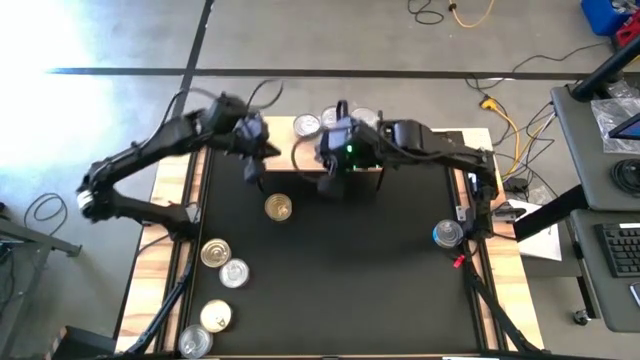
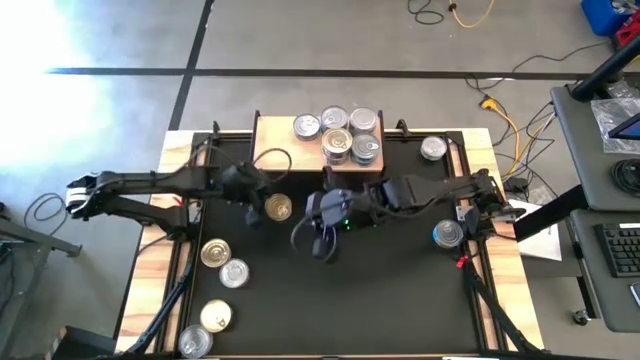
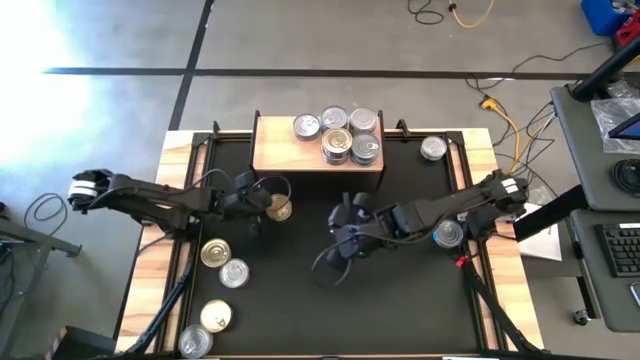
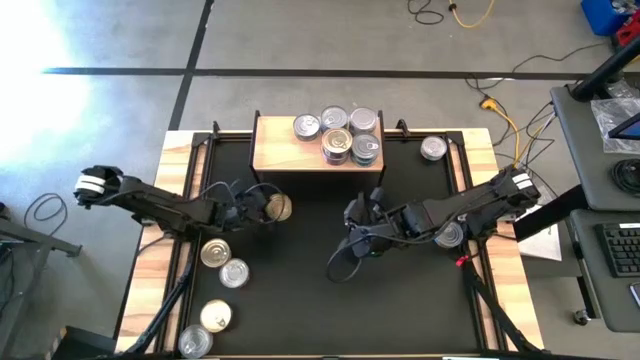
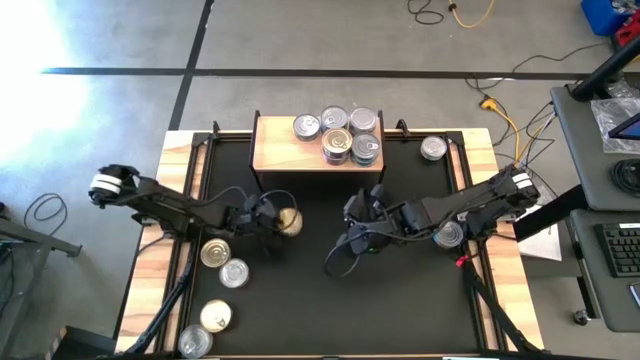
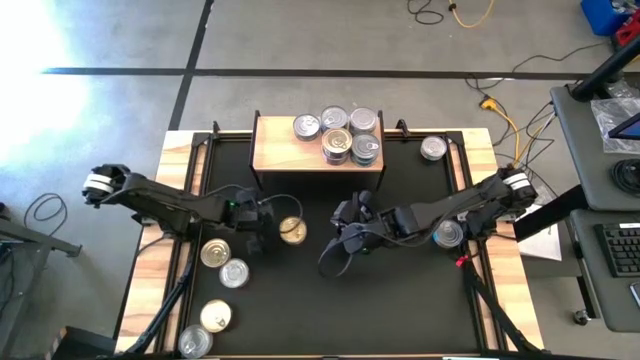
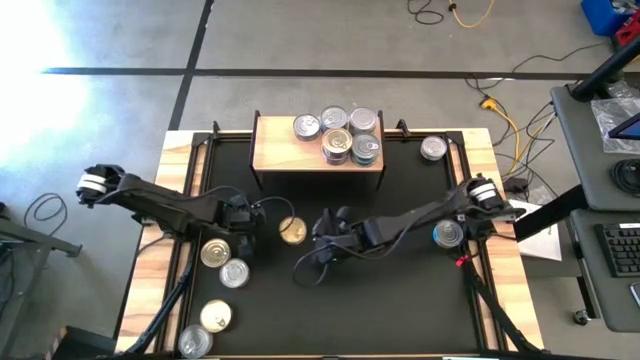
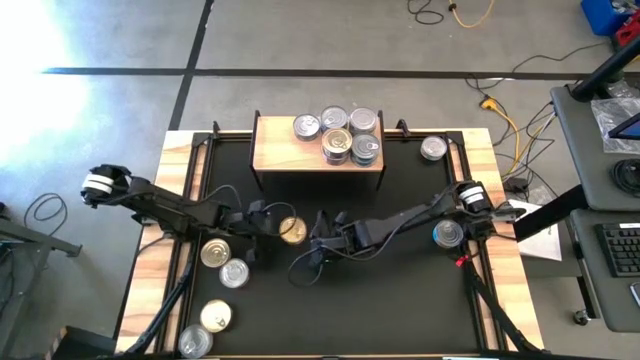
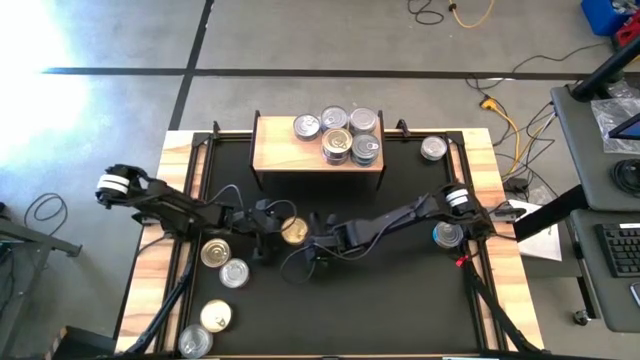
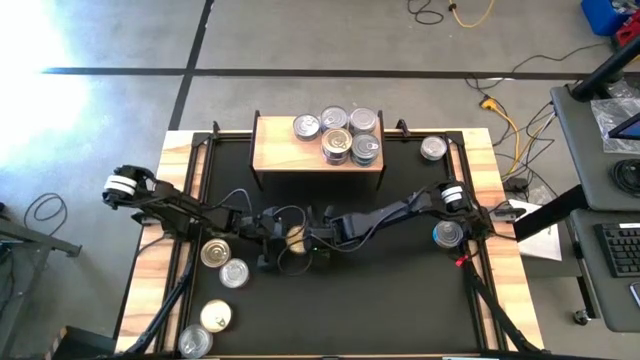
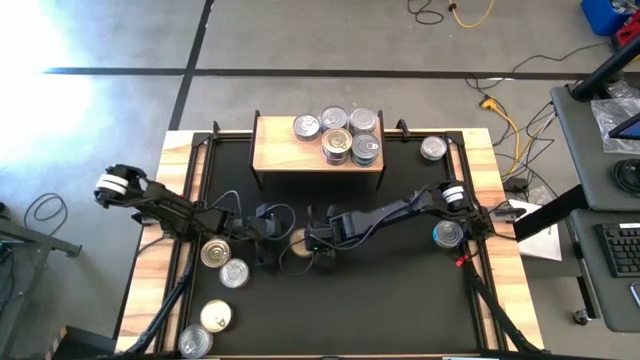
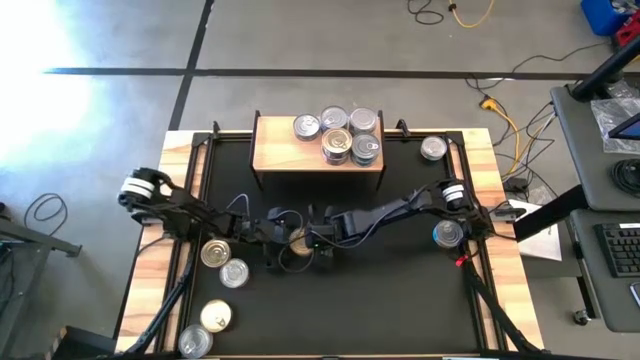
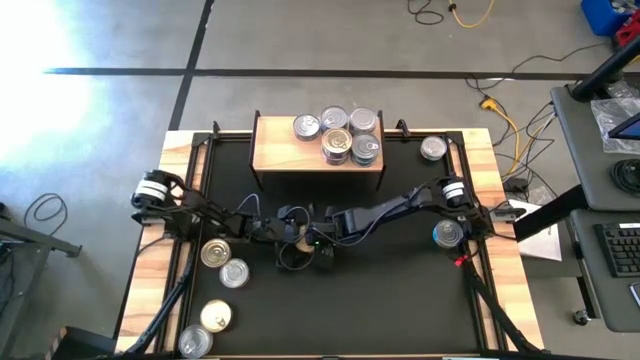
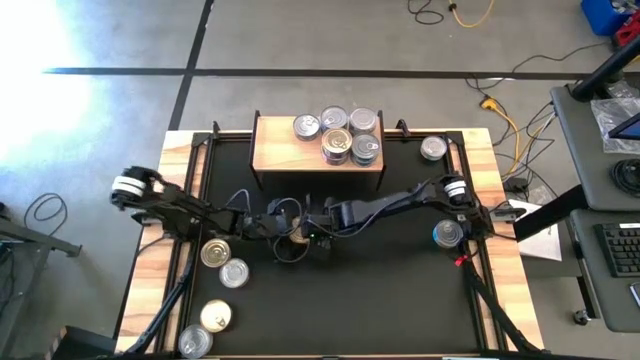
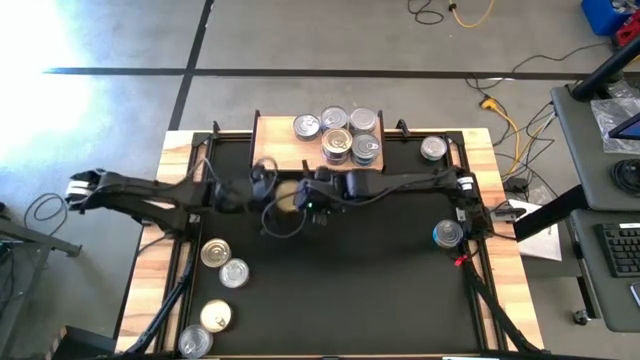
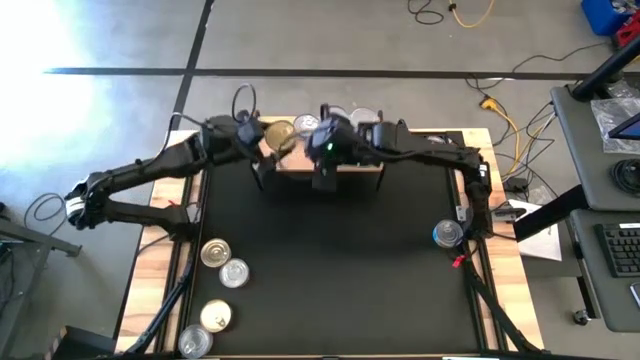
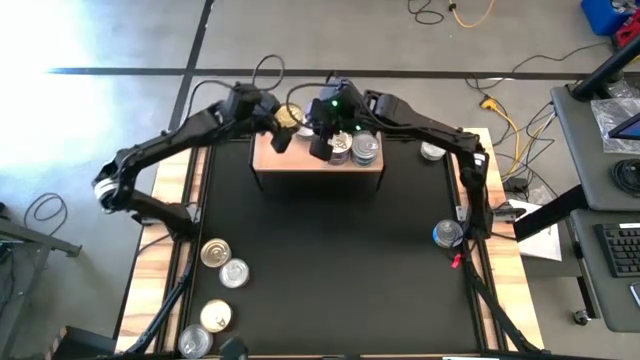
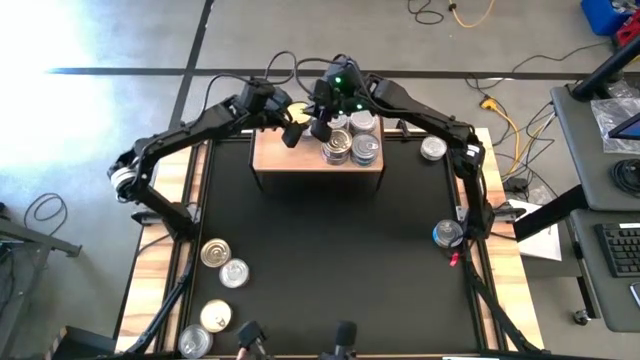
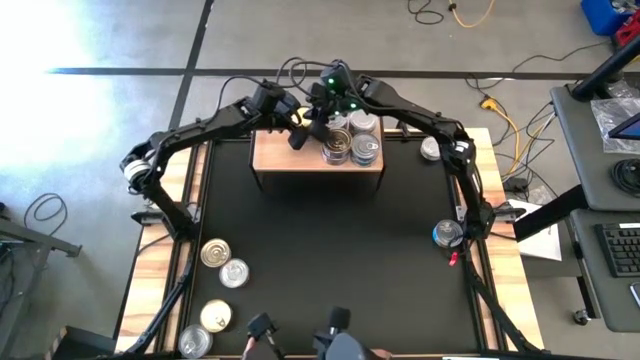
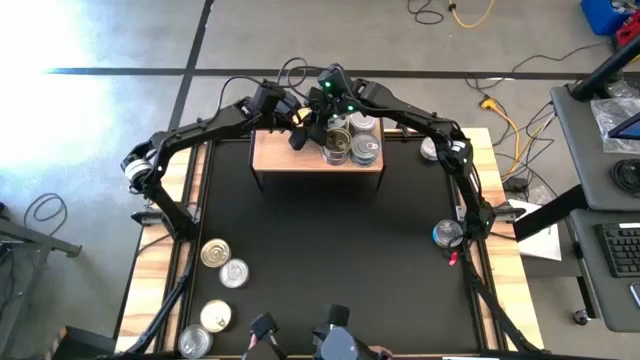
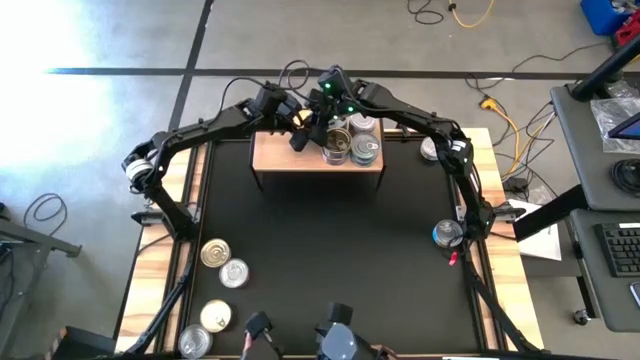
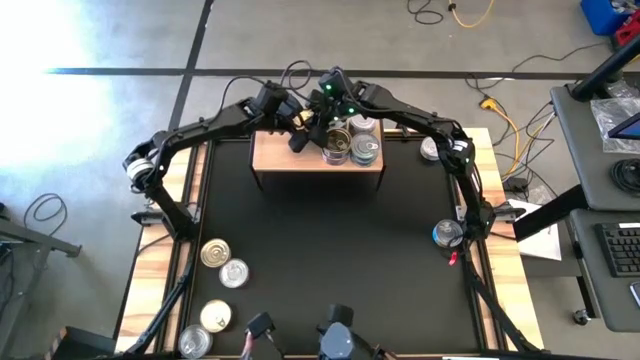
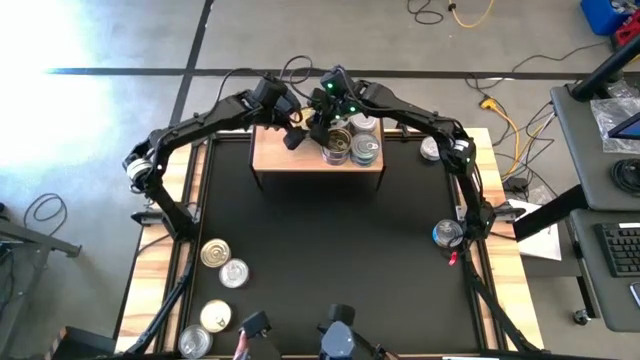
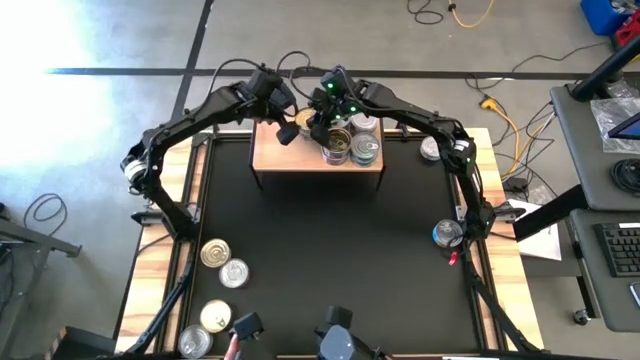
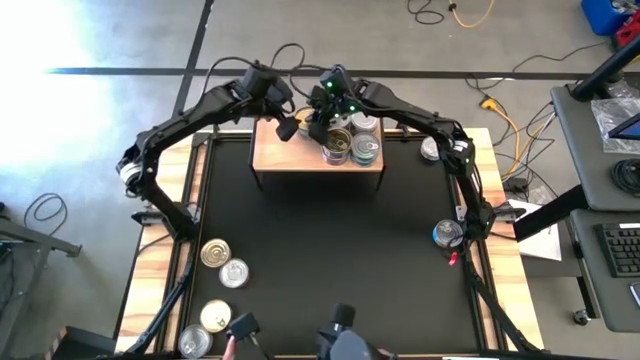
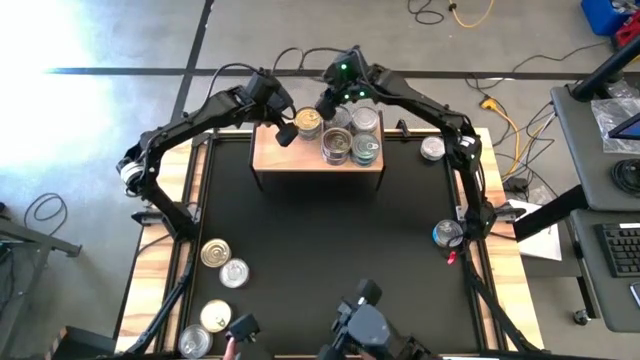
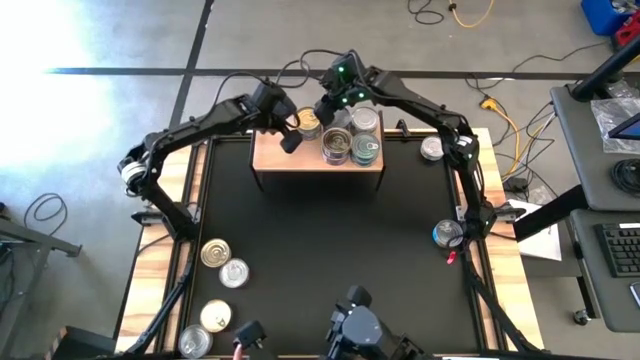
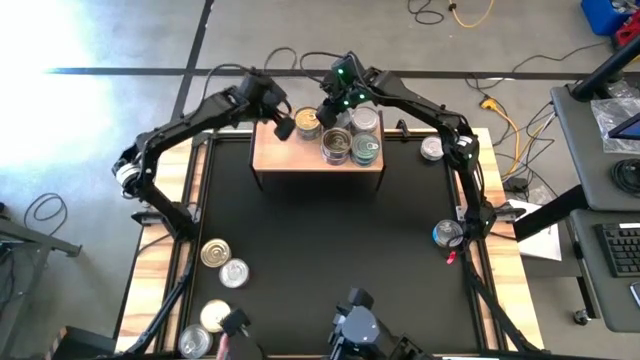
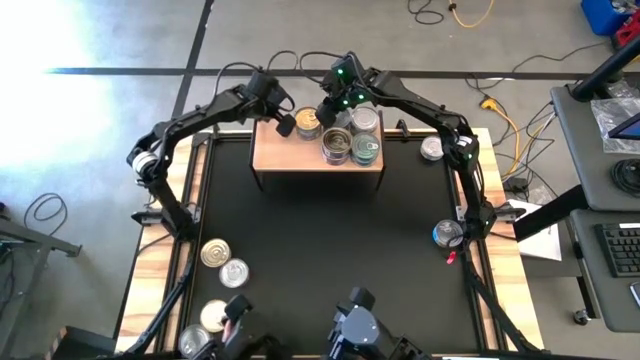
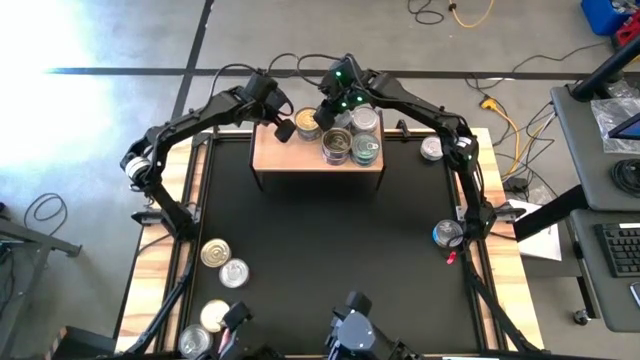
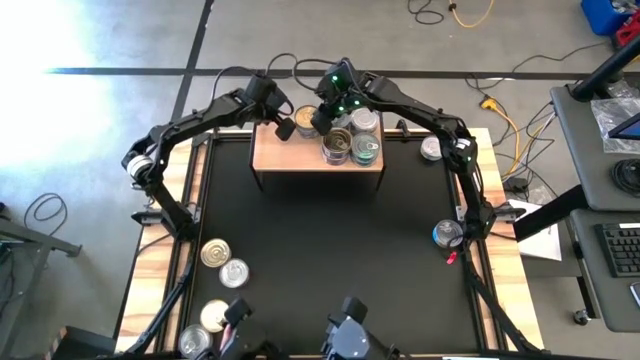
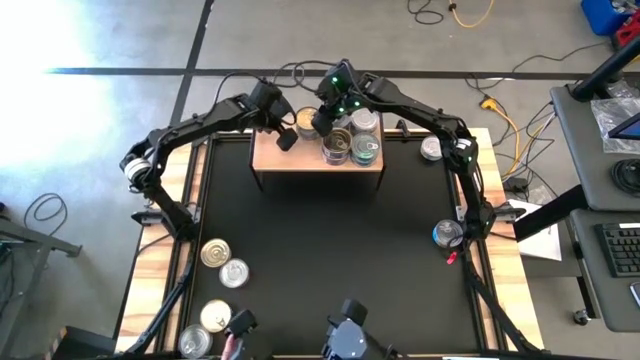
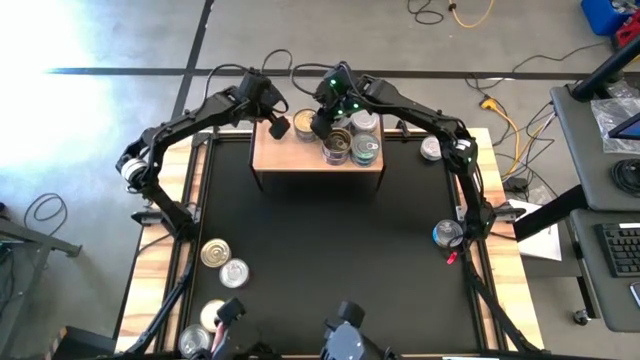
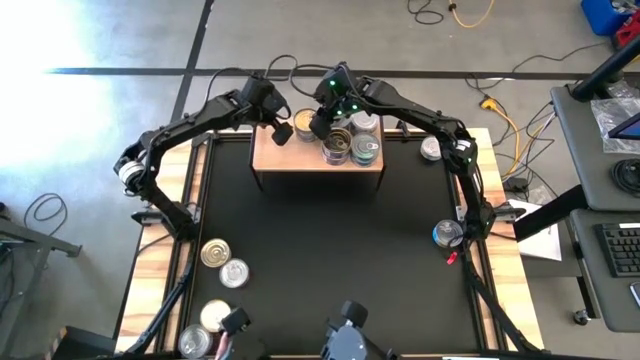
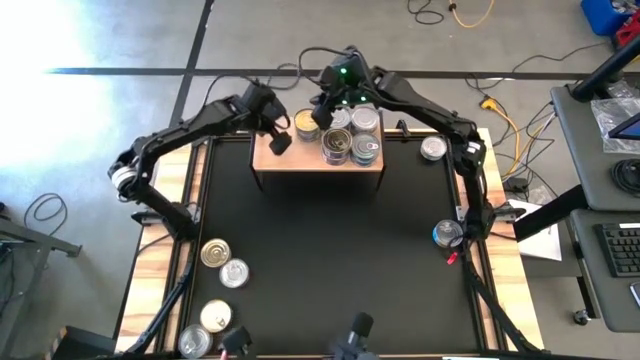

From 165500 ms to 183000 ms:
Task: Stack canned seafood by type on shelf
Stack the green tuna can on top of the green tuna can on the shelf

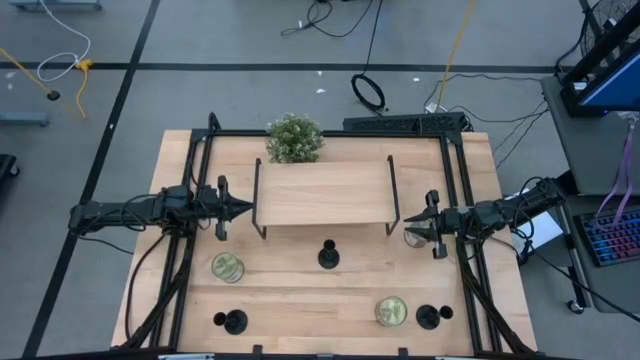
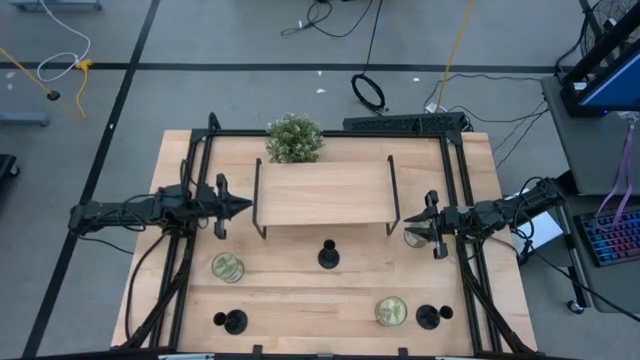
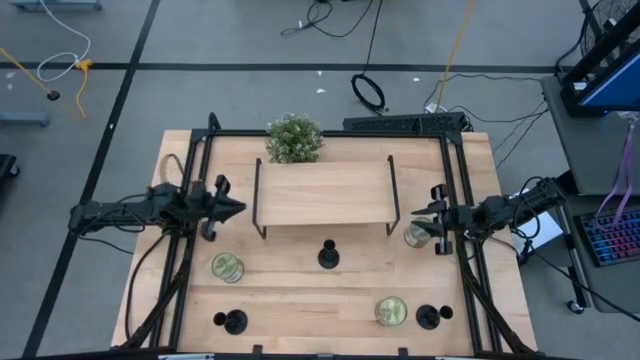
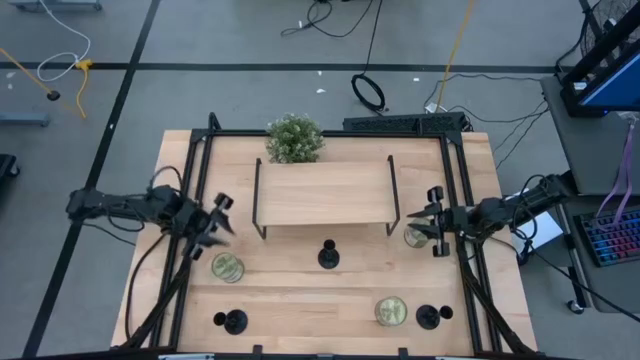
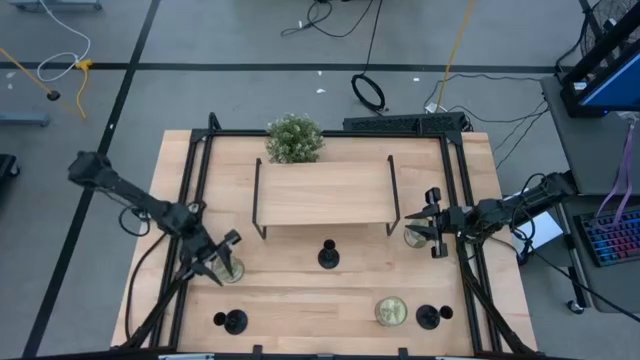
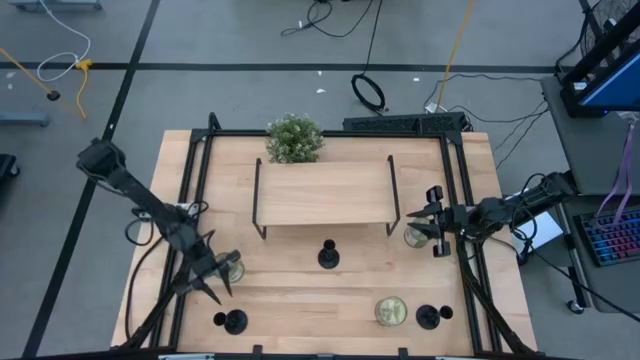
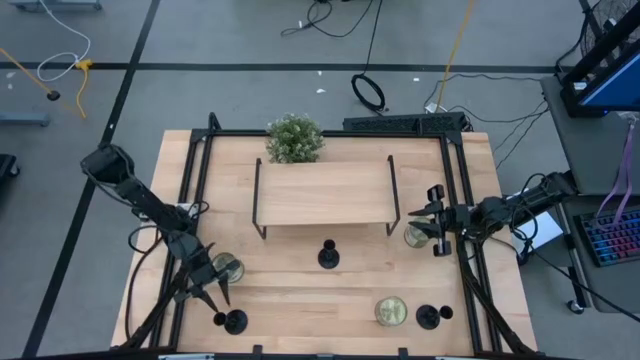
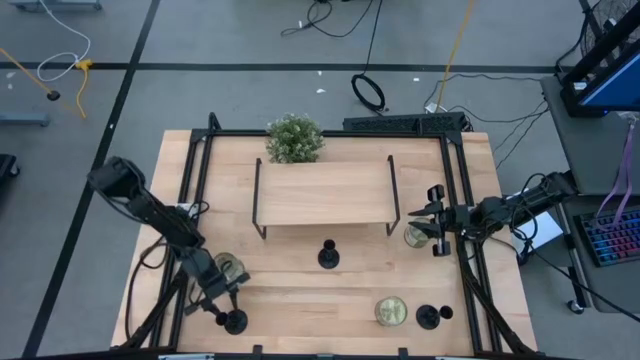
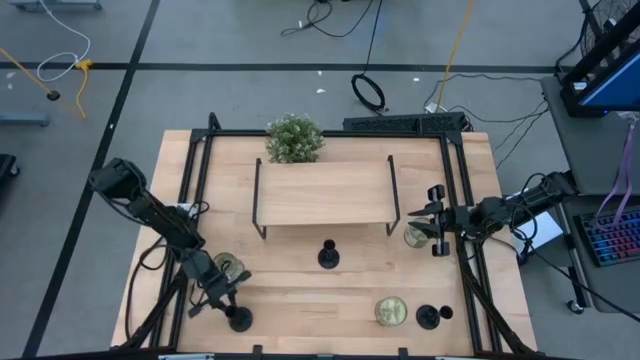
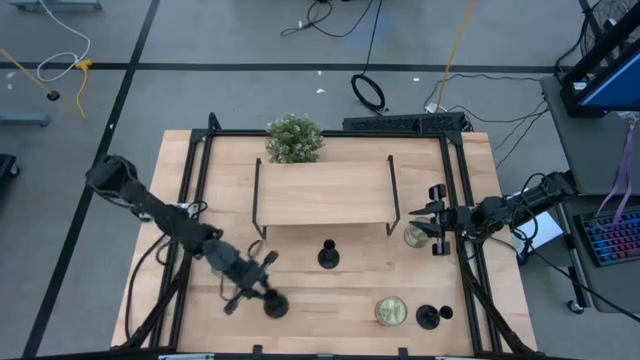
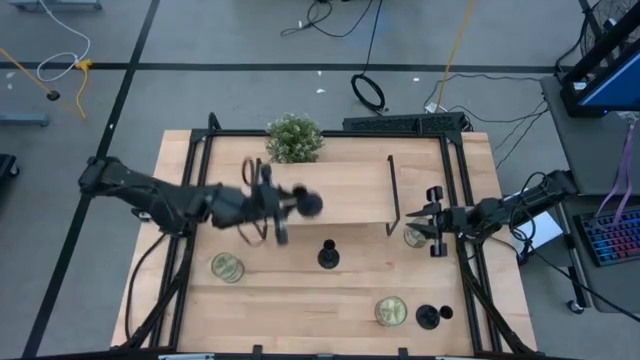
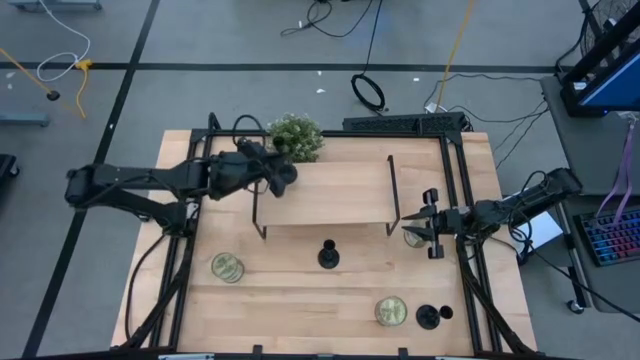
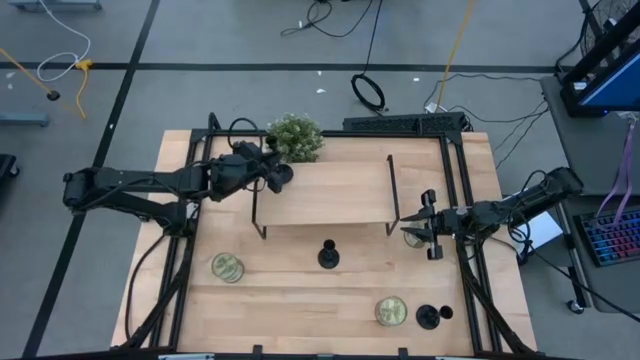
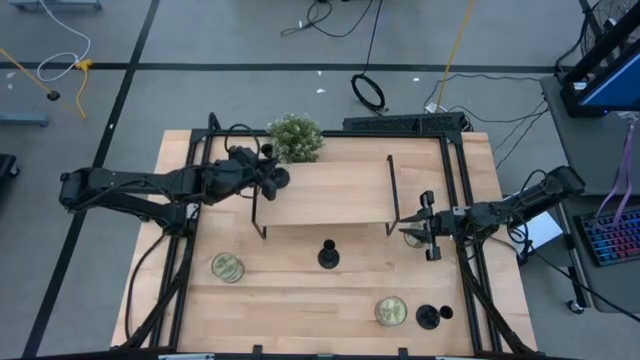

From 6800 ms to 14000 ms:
Task: Pick & Place candle stick holders
Put the bottom left black candle holder on the shelf
